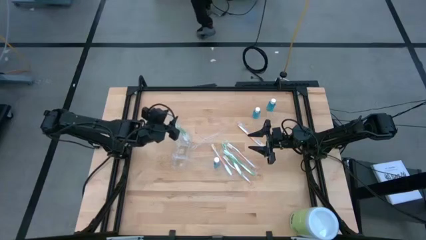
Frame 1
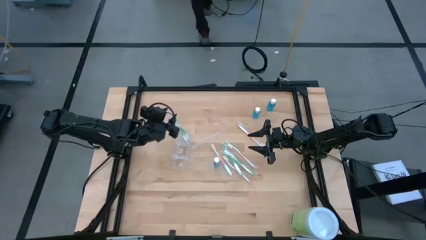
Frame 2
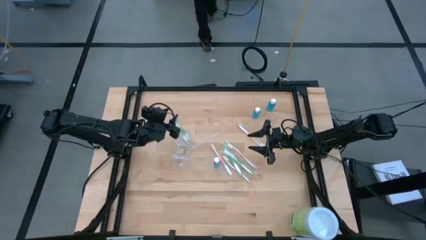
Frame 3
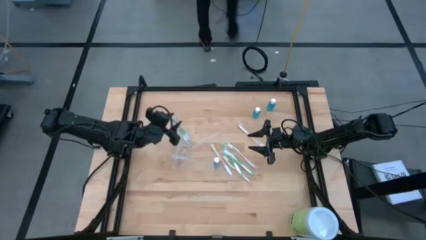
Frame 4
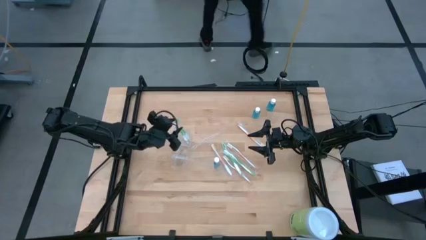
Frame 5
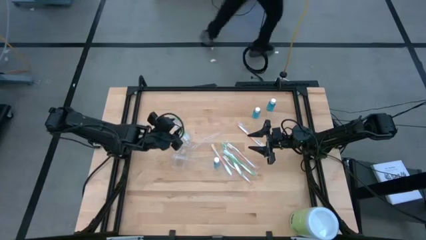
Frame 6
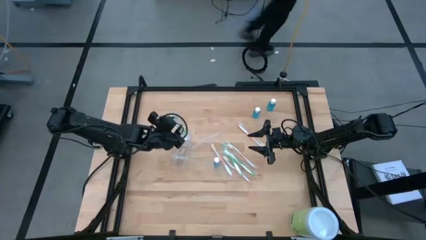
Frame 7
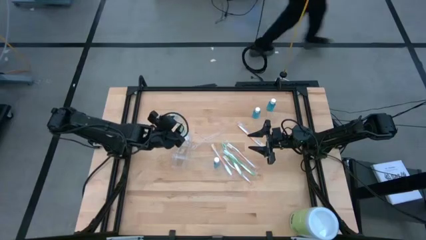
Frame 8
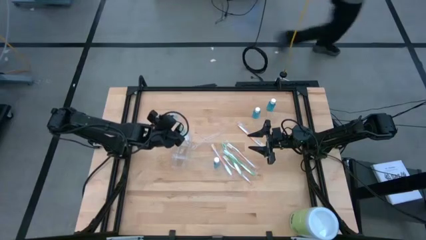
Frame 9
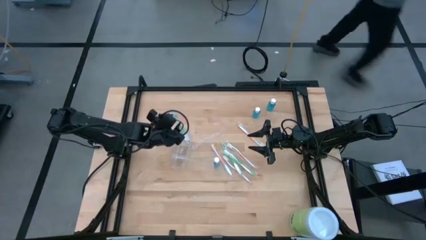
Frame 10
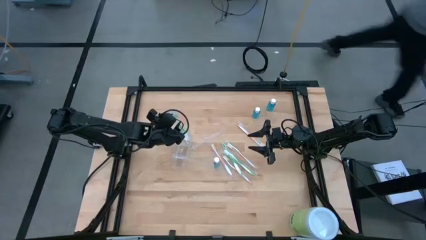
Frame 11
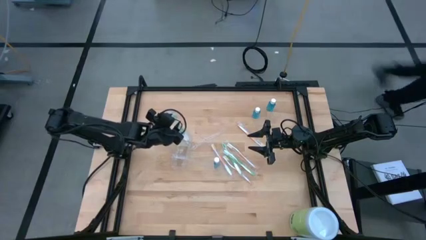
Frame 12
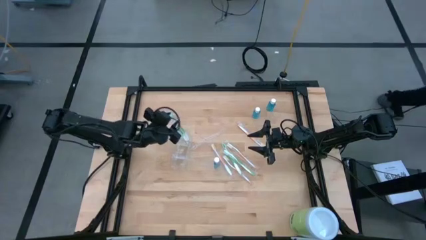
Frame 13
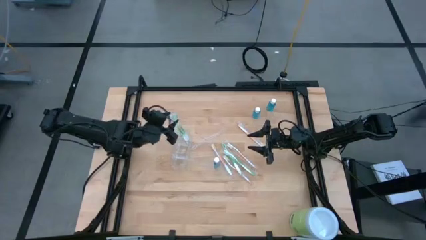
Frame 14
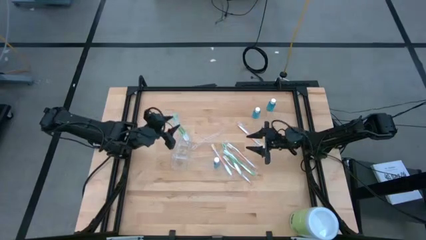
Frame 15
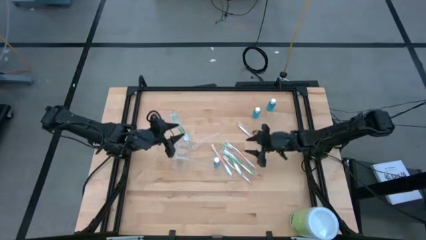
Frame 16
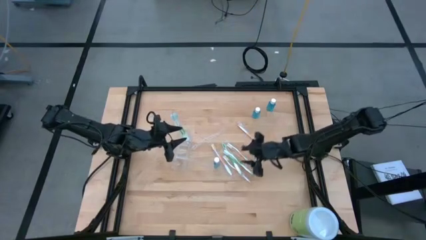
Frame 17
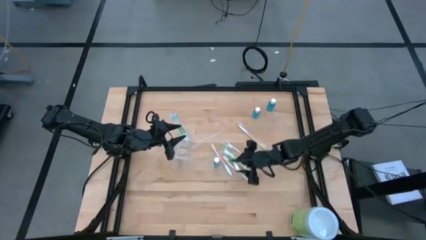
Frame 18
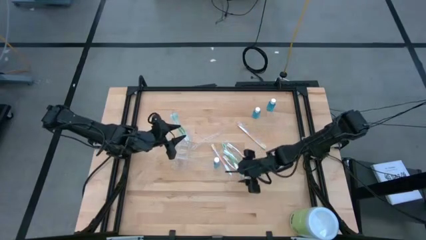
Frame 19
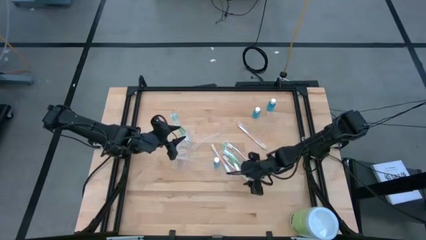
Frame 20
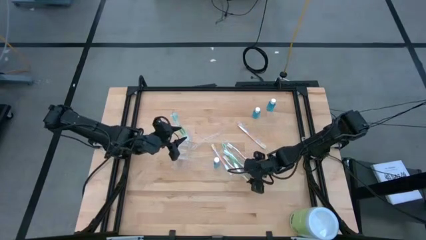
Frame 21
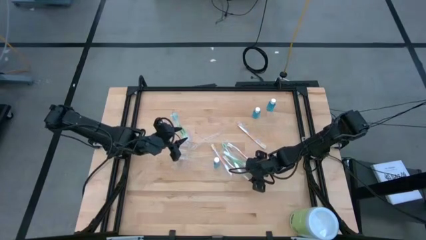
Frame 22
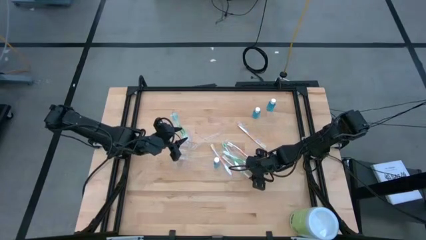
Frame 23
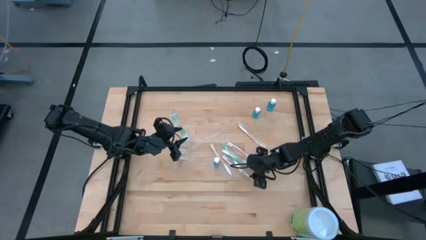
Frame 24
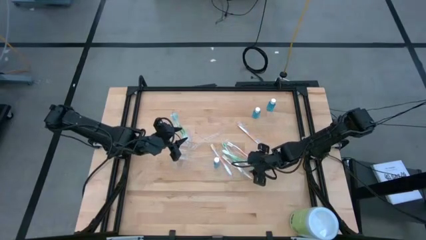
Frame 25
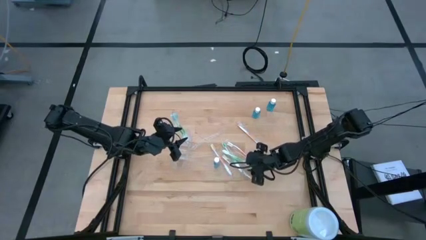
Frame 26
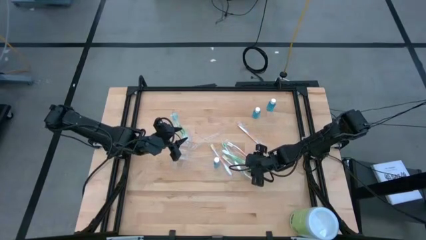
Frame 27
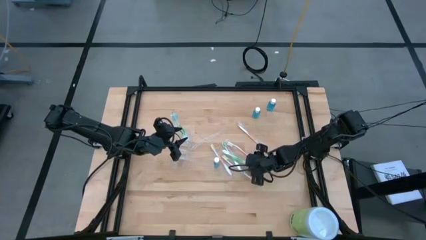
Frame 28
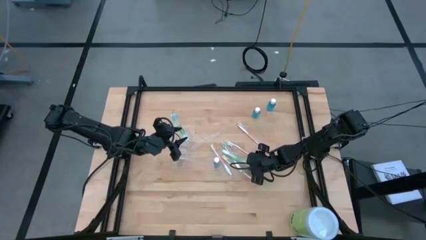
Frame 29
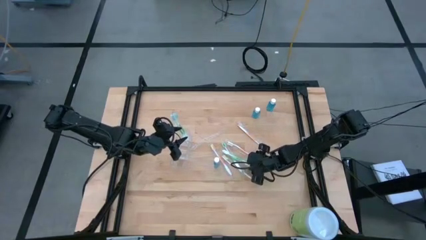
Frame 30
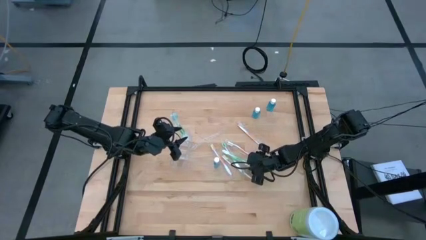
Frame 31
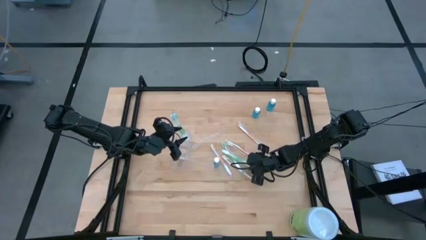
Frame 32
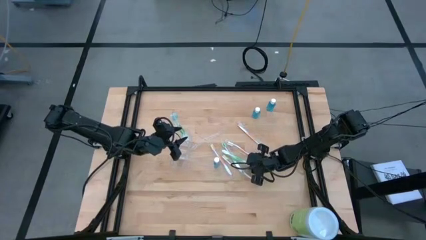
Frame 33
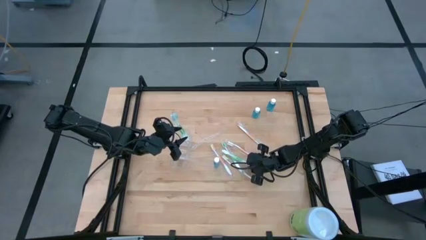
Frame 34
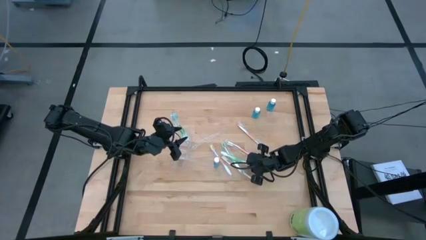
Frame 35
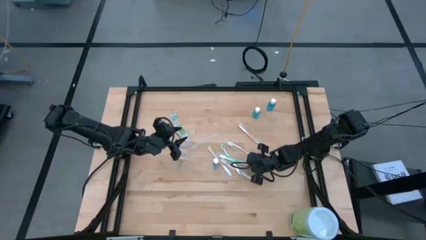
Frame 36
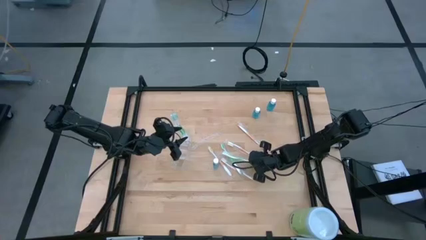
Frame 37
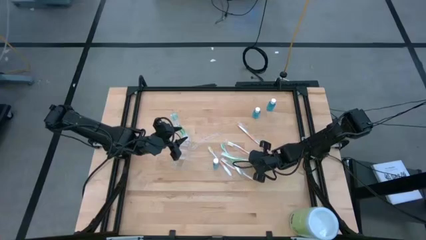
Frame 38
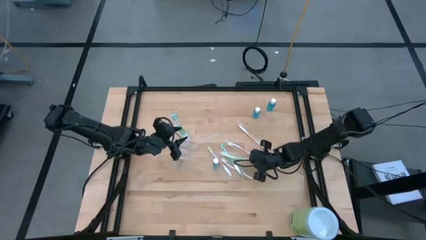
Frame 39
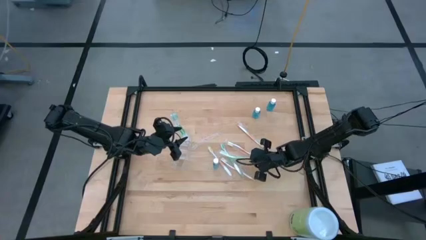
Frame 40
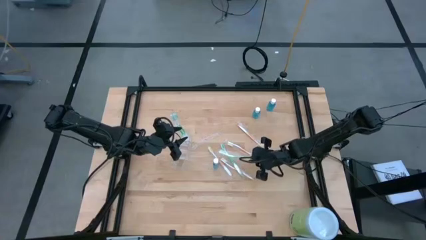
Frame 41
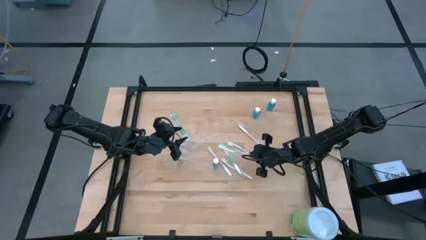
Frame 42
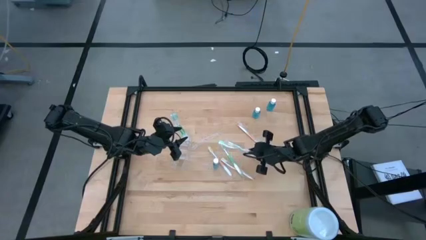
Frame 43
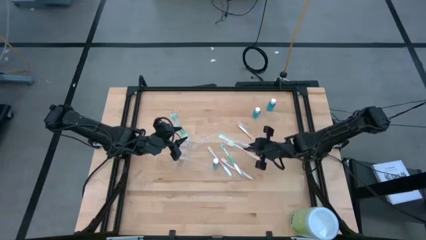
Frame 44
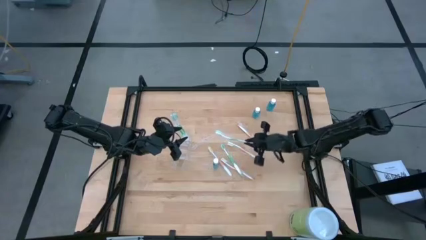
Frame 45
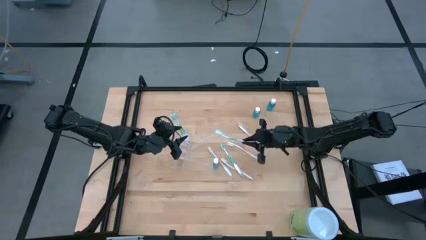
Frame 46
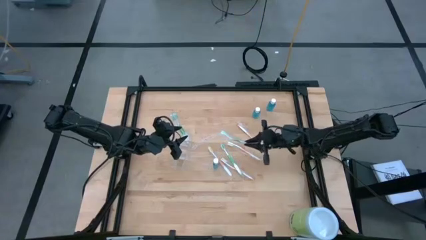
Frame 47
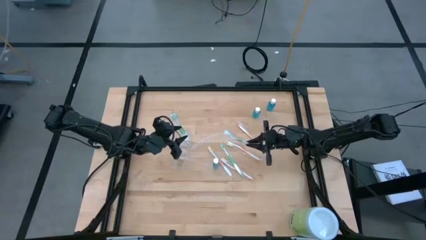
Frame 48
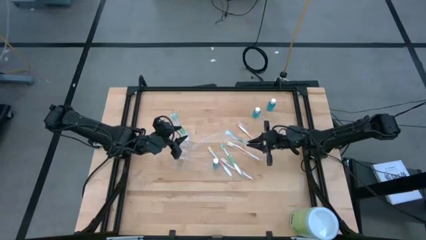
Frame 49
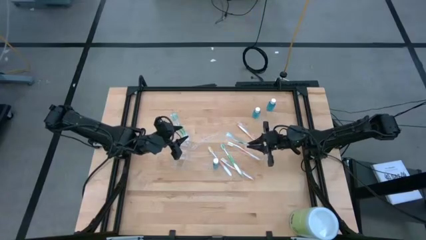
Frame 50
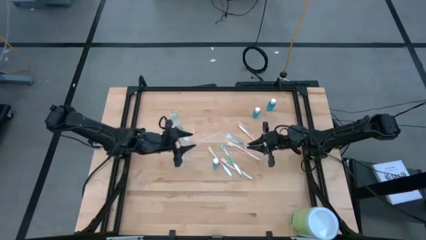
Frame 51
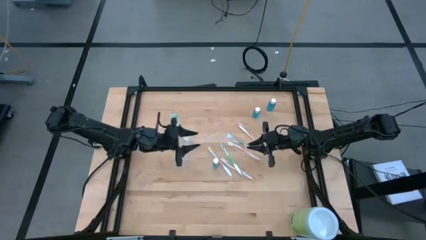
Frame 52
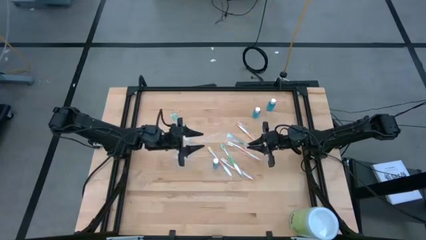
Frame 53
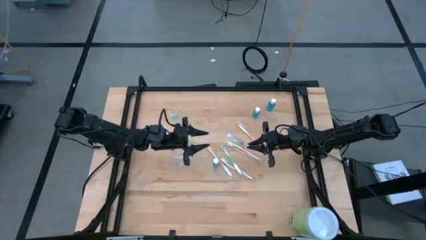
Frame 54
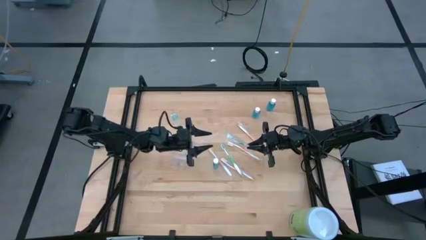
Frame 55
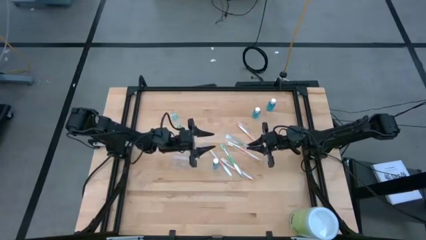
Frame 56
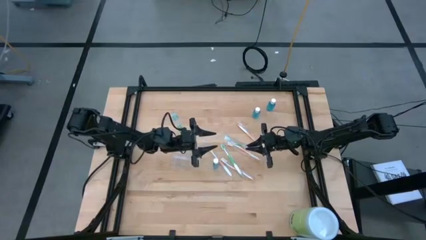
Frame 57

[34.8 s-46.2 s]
Task: Pick & Place toothbrushing station
Put the green toothbrush into the top section of the transparent organizer

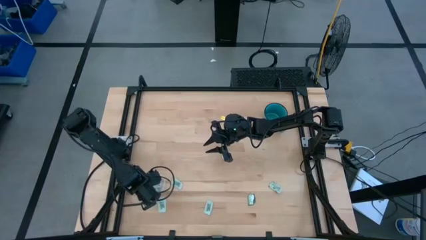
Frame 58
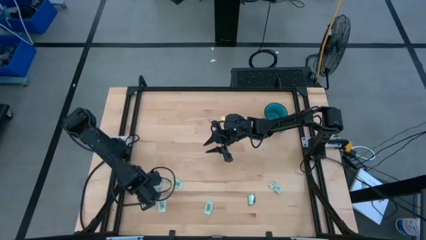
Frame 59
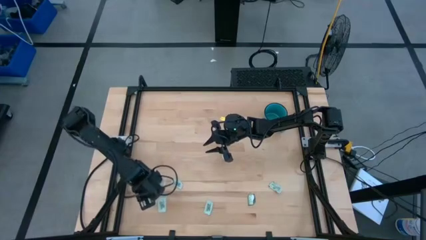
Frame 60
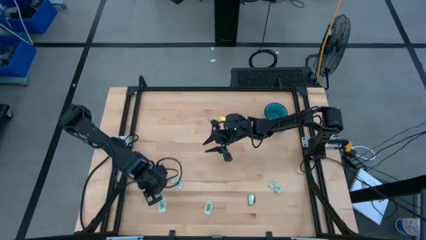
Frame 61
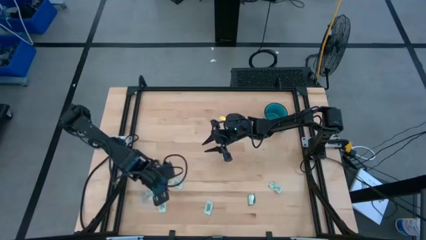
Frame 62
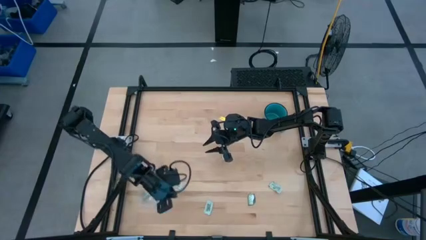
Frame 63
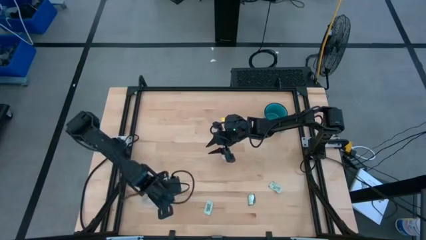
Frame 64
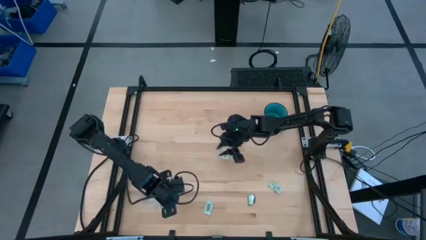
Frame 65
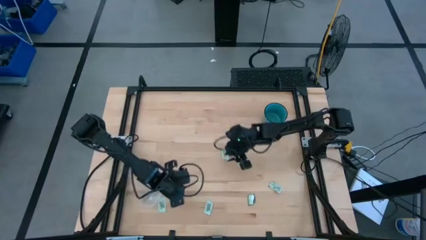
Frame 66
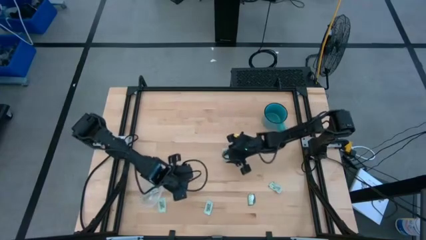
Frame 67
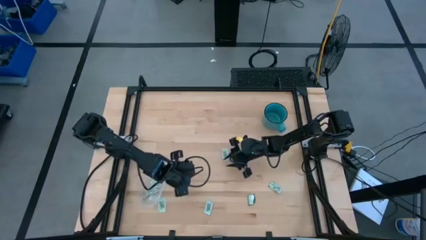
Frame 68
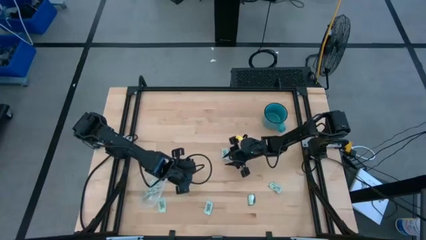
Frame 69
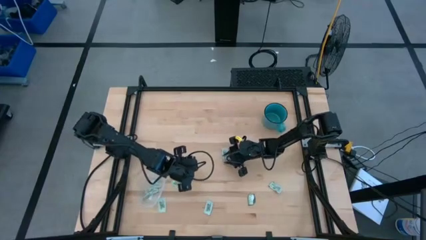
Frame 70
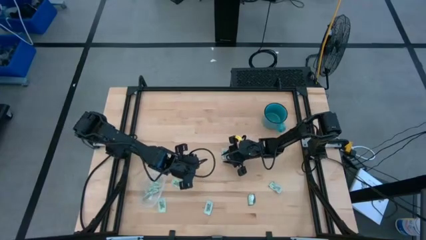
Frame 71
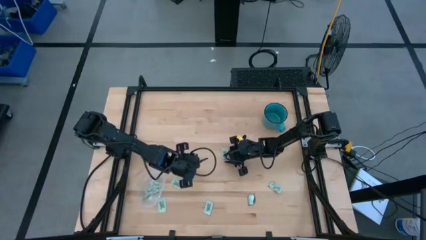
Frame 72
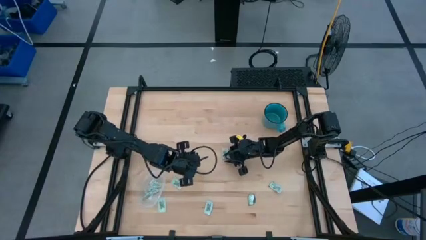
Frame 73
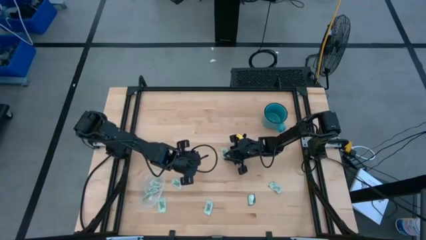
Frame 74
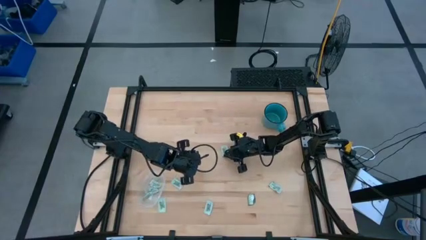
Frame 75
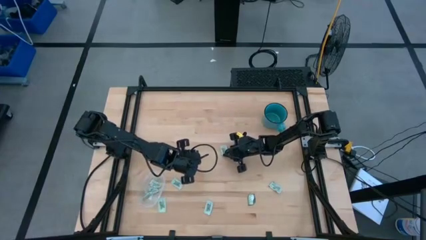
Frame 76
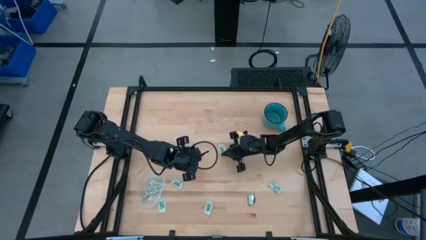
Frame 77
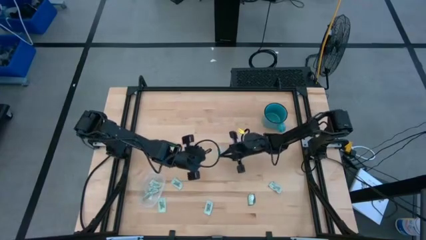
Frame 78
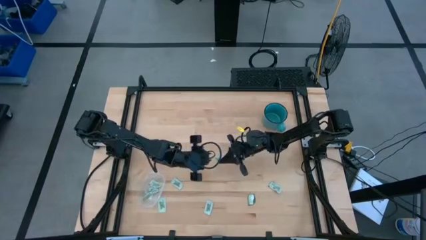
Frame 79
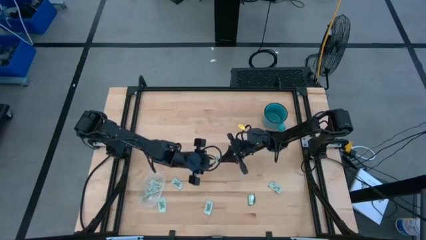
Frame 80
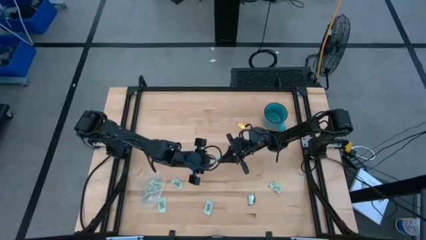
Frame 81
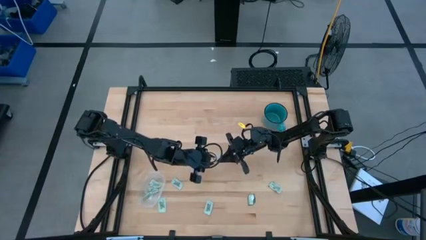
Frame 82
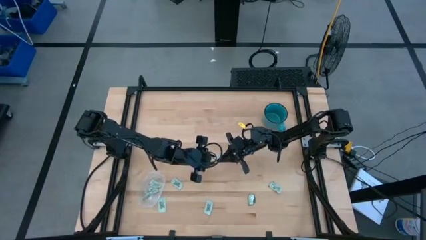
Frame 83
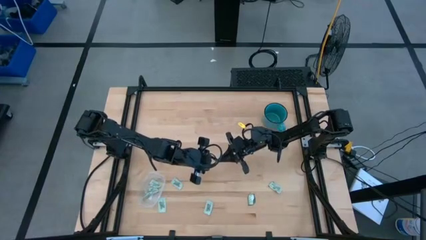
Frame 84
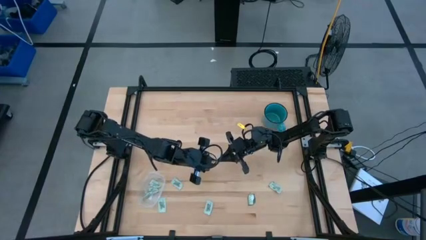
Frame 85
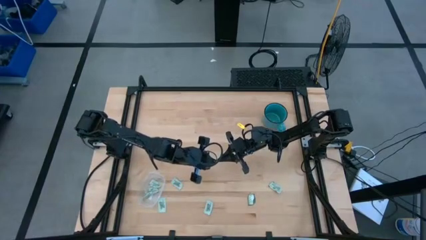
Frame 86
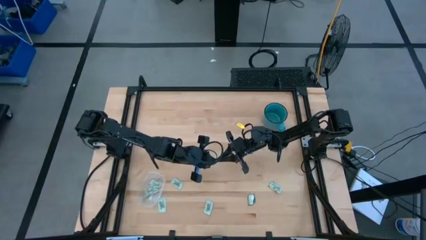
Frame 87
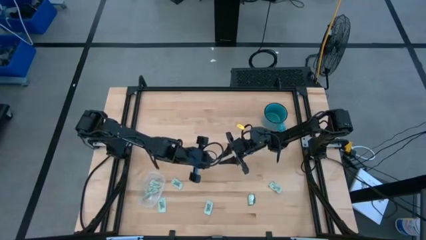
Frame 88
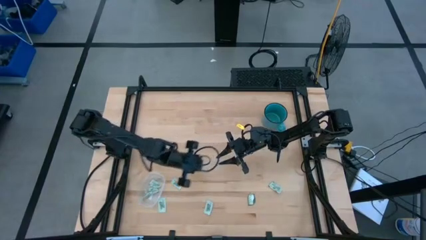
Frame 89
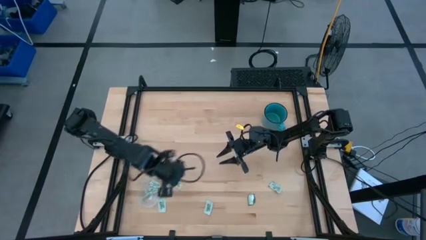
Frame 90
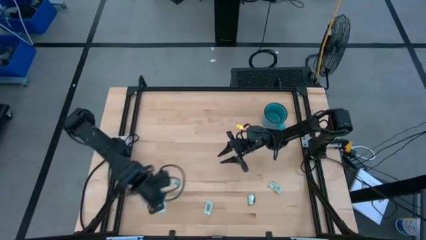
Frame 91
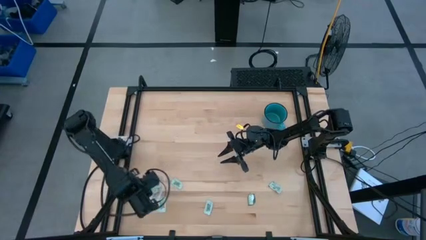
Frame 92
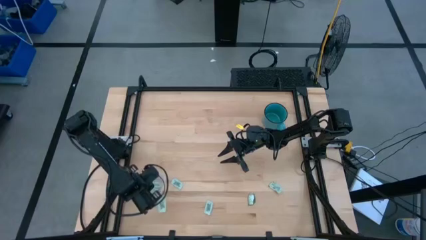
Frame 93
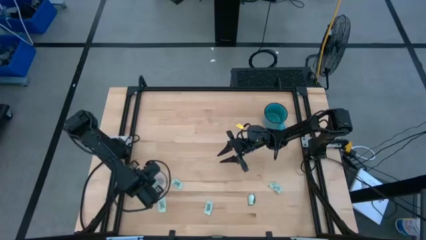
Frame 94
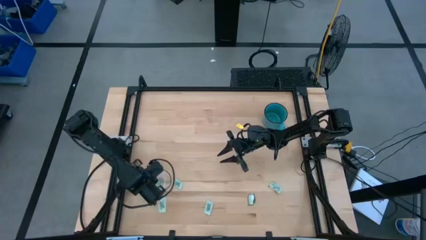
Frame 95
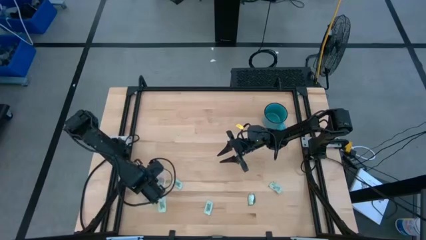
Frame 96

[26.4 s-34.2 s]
Task: Pick and place Stevia / Truvia into bins
Put the white stevia packet into the transparent bin
